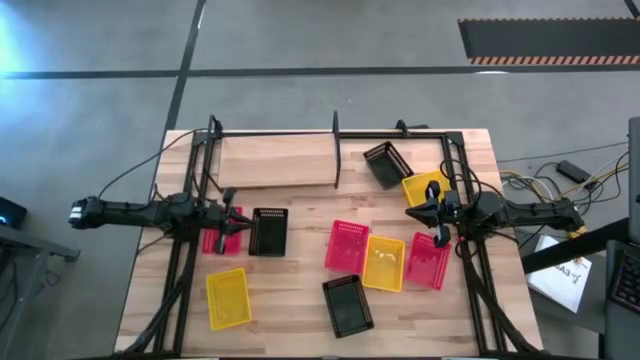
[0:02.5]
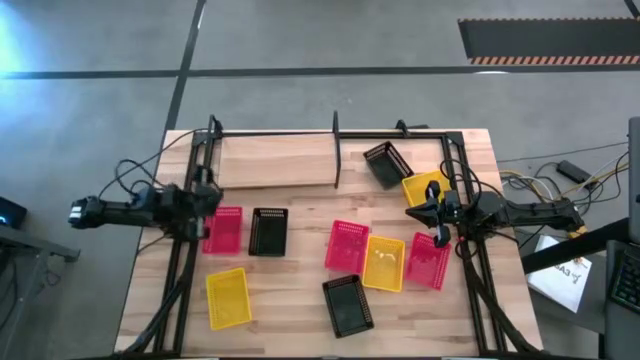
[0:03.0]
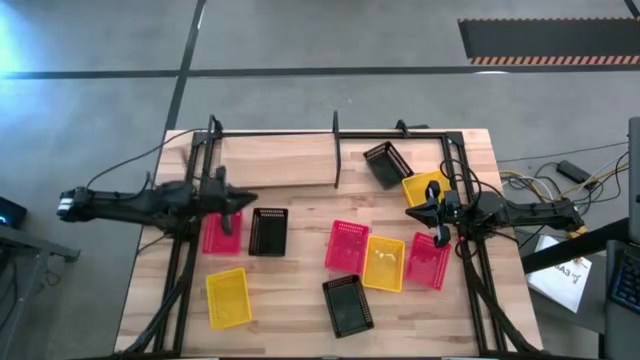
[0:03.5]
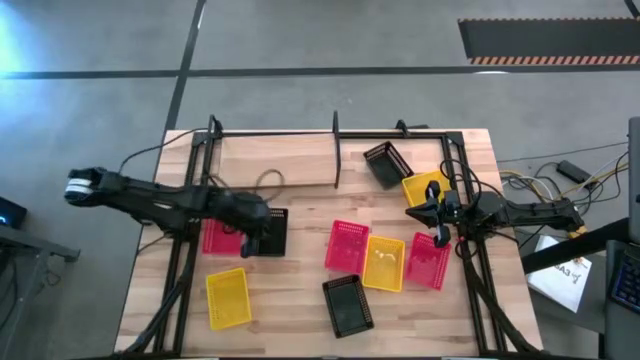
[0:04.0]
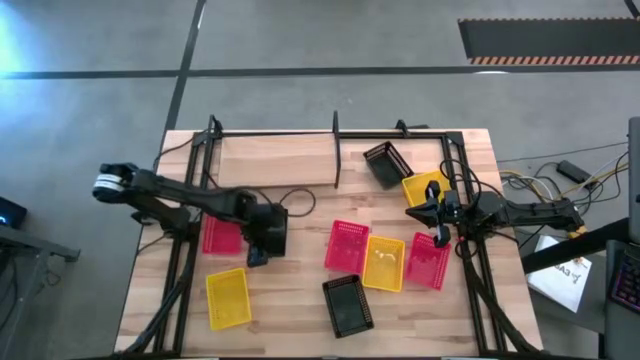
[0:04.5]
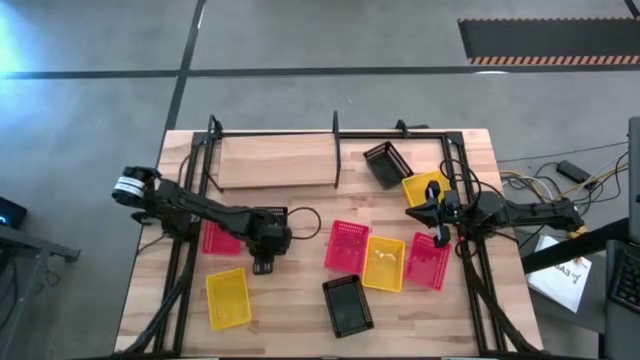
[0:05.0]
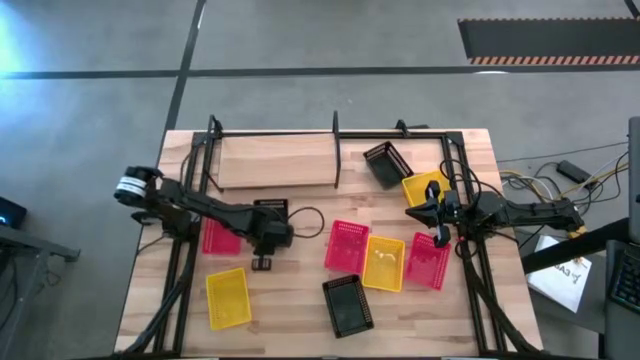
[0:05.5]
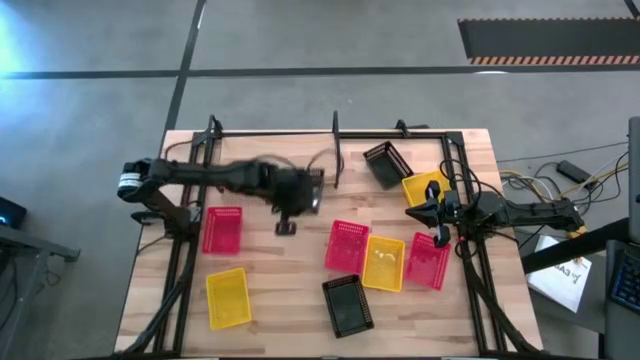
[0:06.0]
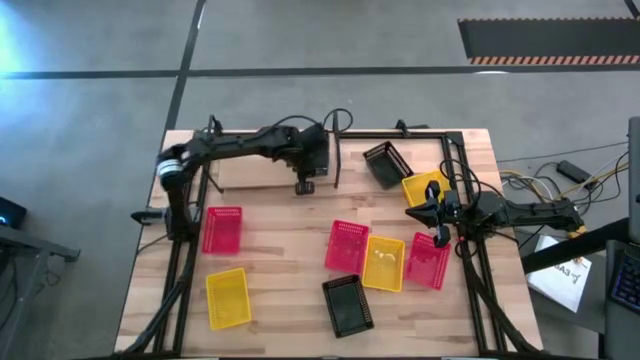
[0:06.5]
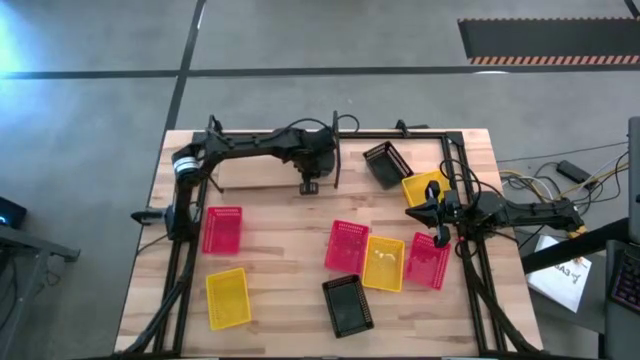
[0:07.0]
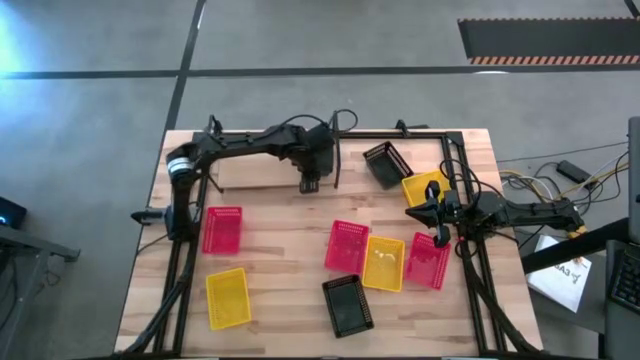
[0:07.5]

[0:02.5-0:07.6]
Task: Stack baskets on shelf by color
Put the left black bin on the shelf

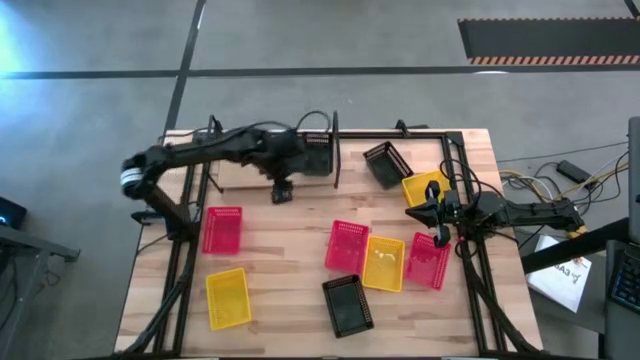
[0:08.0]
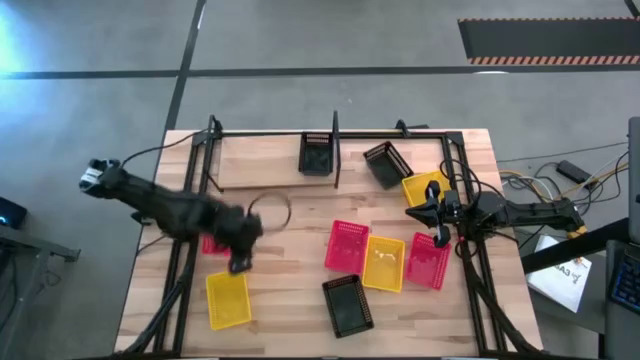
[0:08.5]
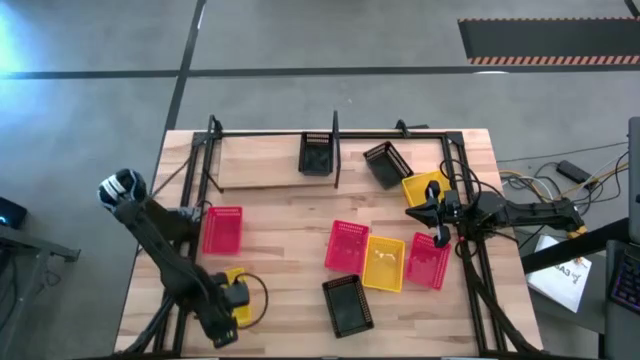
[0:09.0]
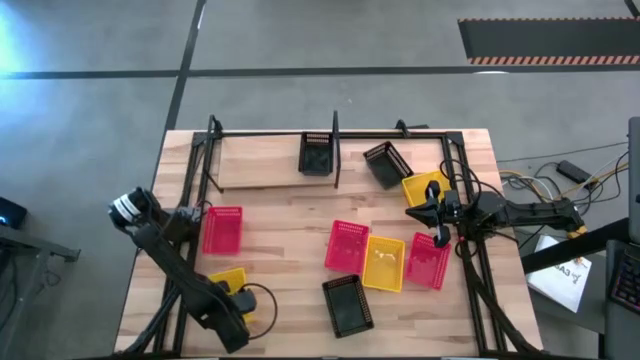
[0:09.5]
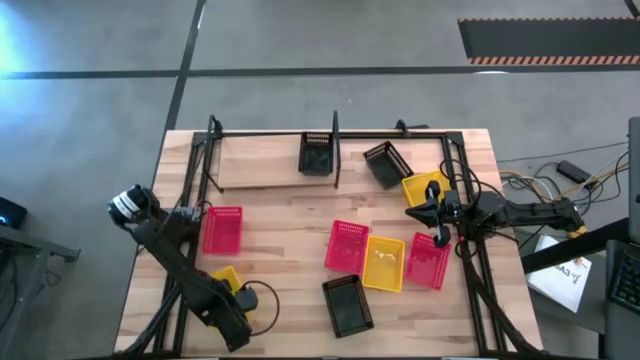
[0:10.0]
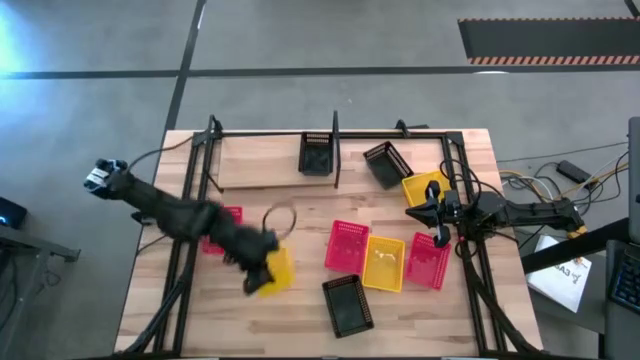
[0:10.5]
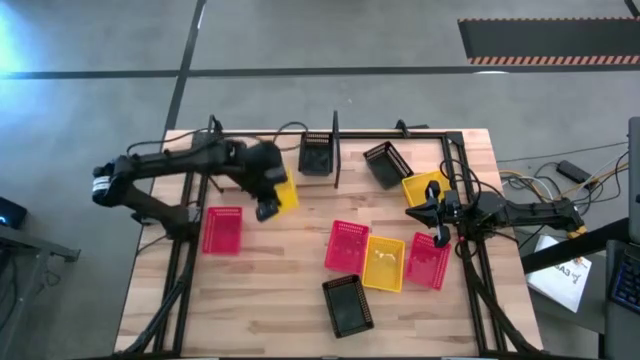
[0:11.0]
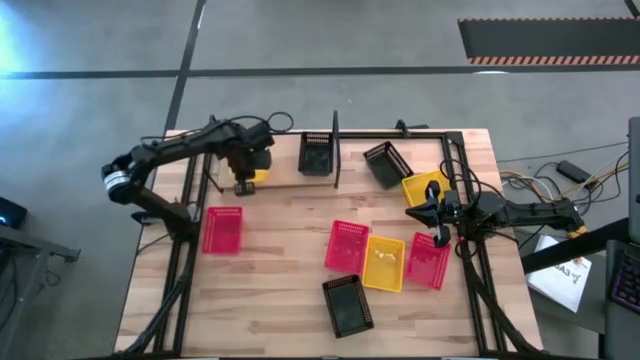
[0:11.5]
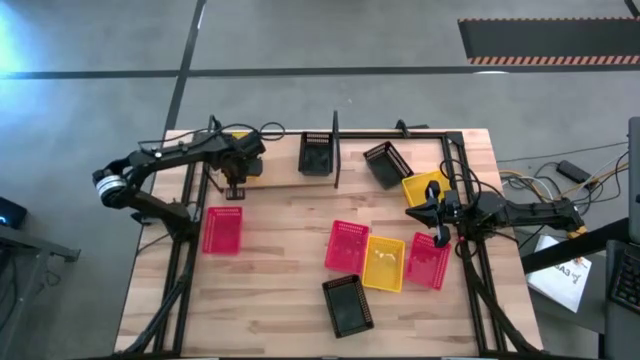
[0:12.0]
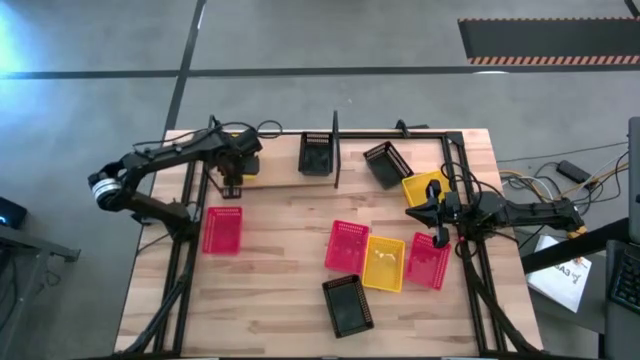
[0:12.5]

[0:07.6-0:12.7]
Put the left yellow bin on the shelf

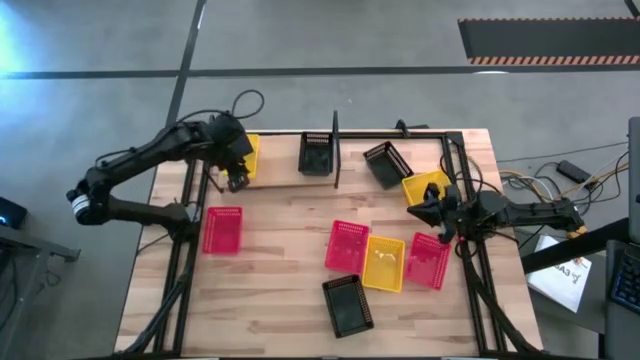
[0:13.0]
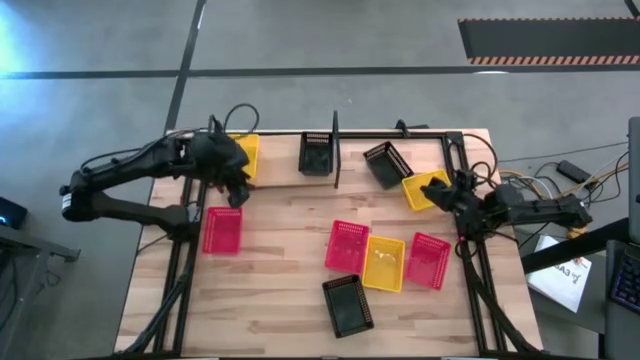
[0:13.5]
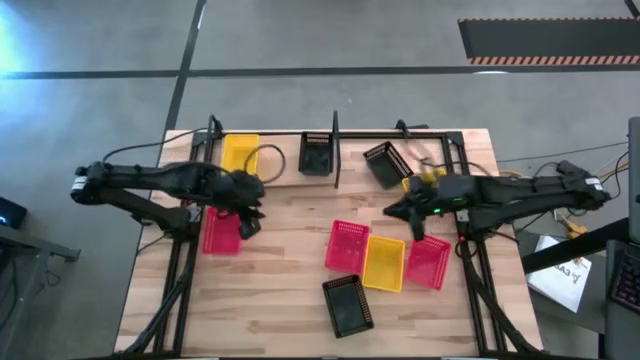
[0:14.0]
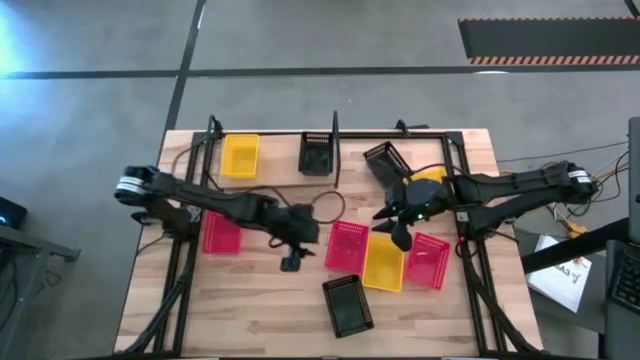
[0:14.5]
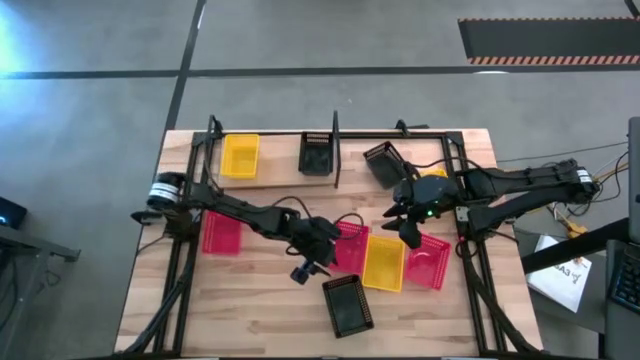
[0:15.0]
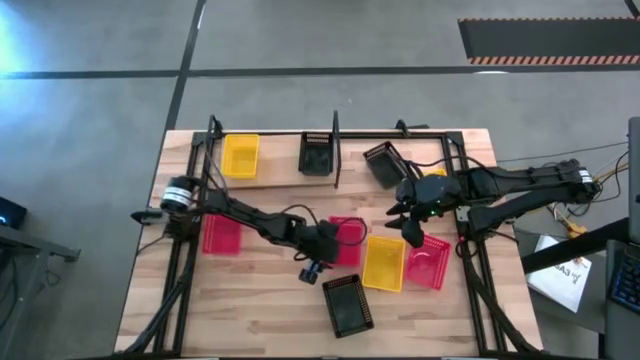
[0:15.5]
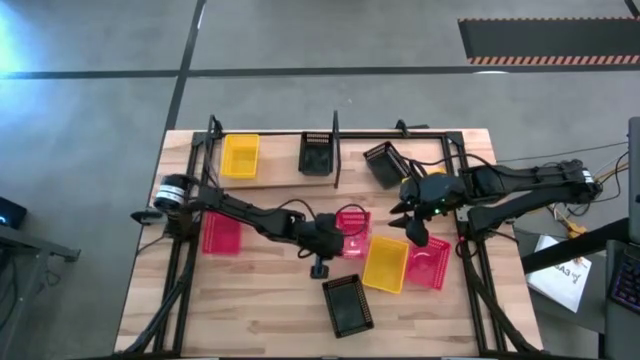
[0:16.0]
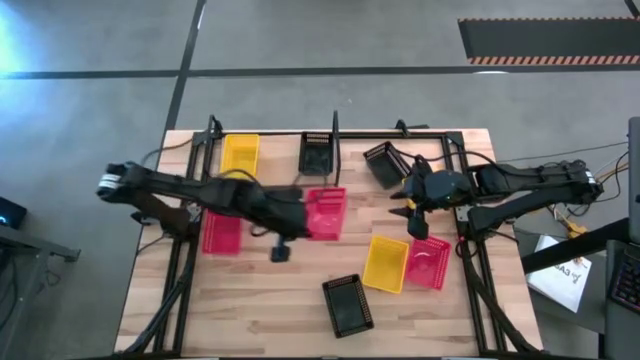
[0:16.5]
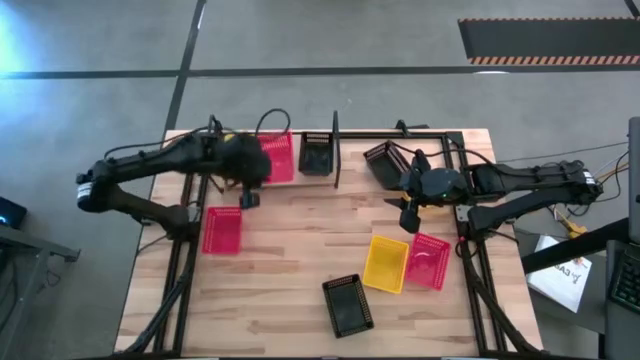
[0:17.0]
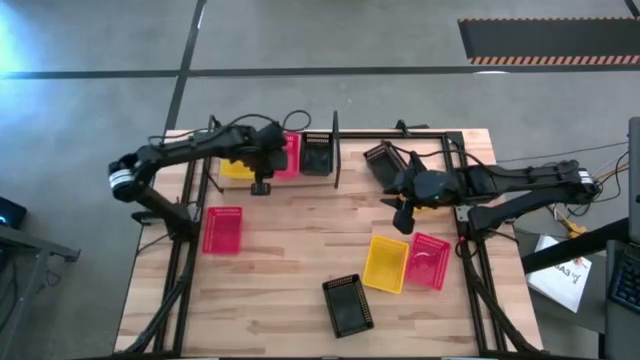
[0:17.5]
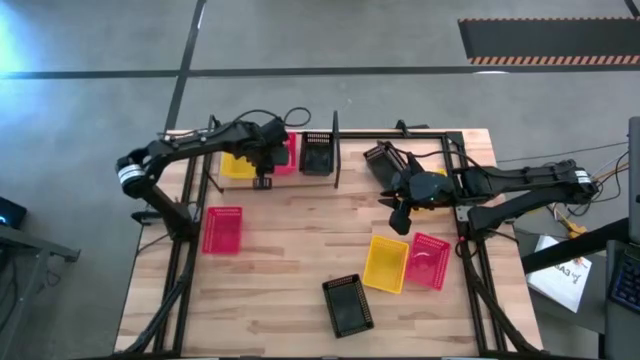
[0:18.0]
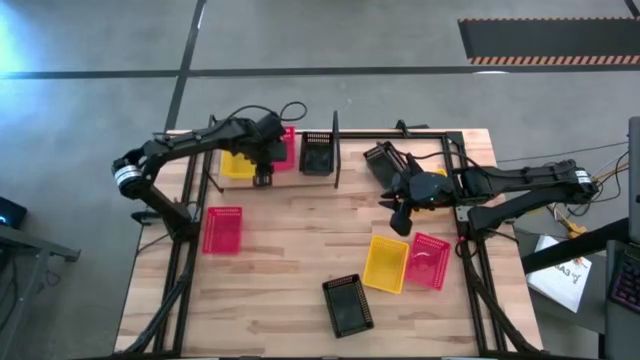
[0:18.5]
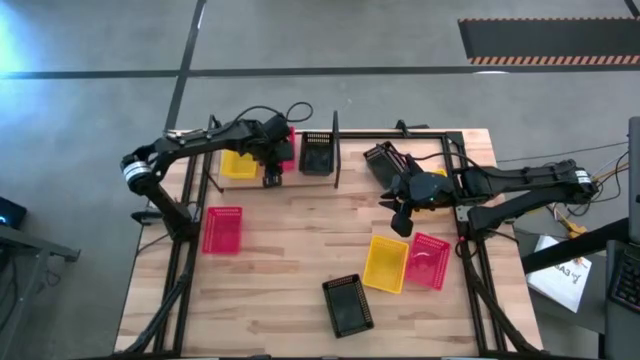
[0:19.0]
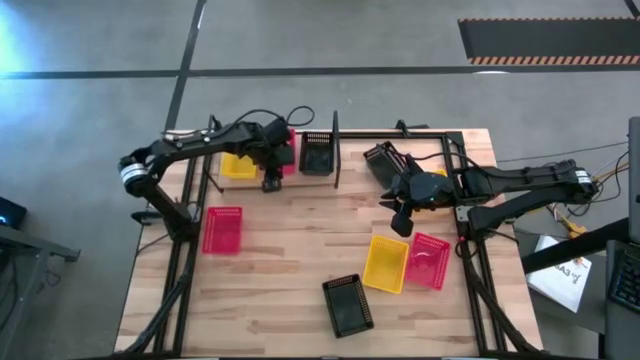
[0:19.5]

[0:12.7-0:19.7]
Put the middle red bin on the shelf

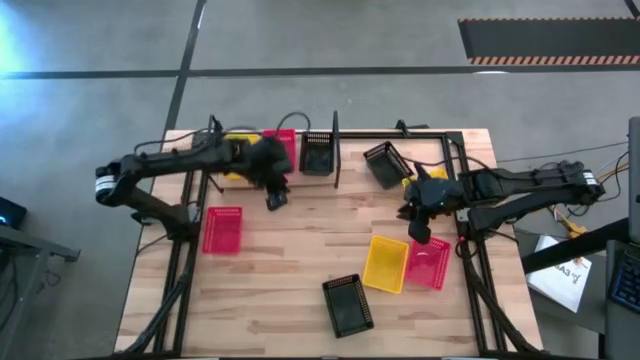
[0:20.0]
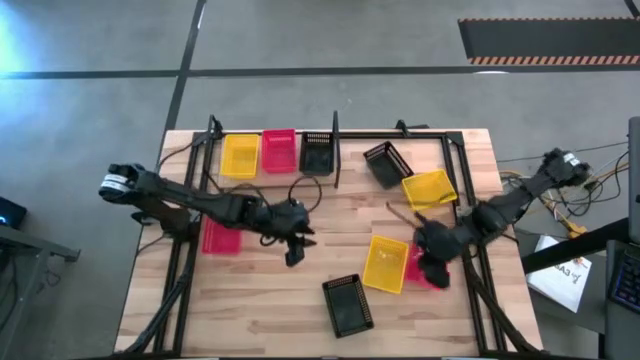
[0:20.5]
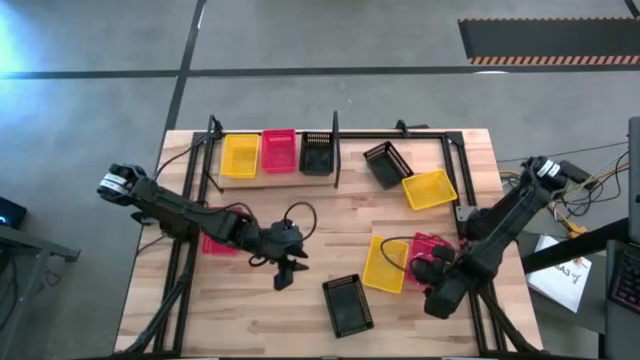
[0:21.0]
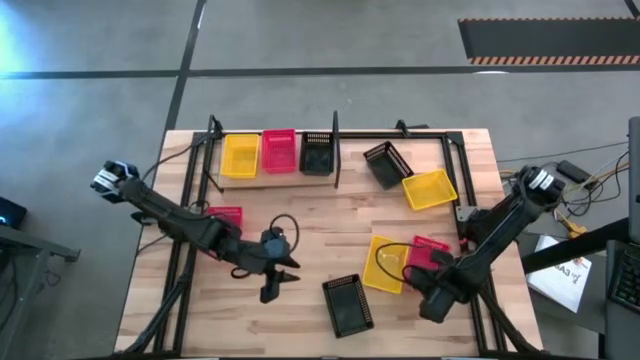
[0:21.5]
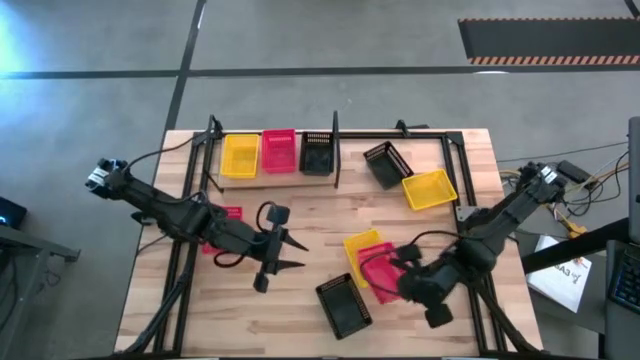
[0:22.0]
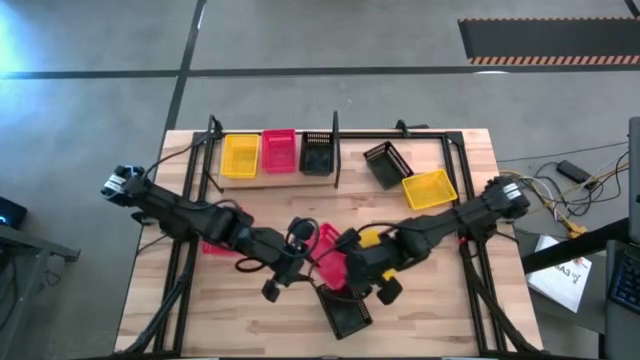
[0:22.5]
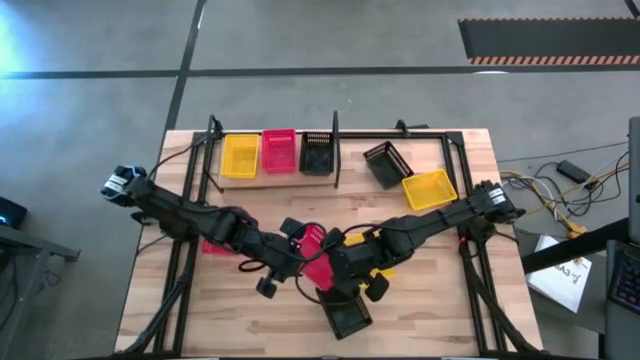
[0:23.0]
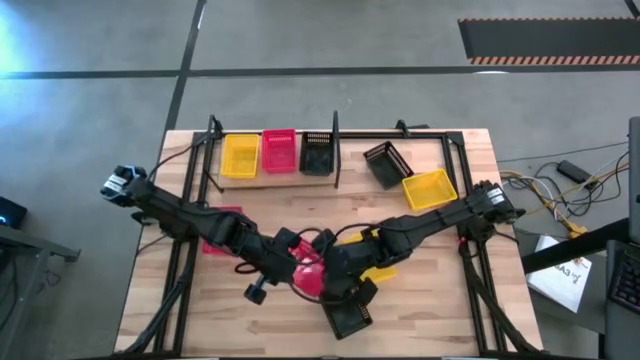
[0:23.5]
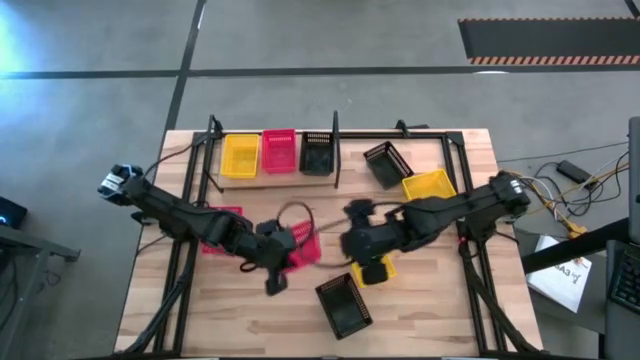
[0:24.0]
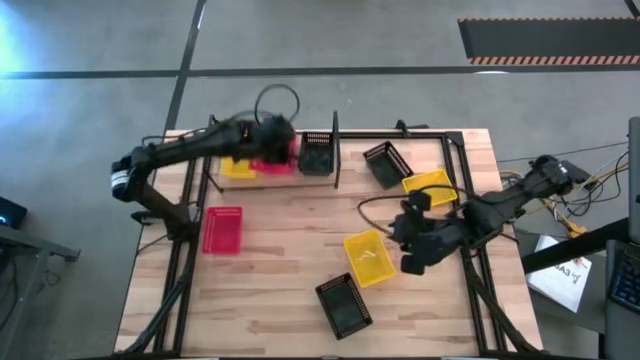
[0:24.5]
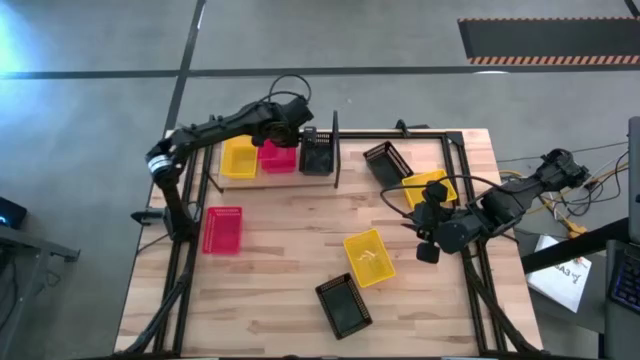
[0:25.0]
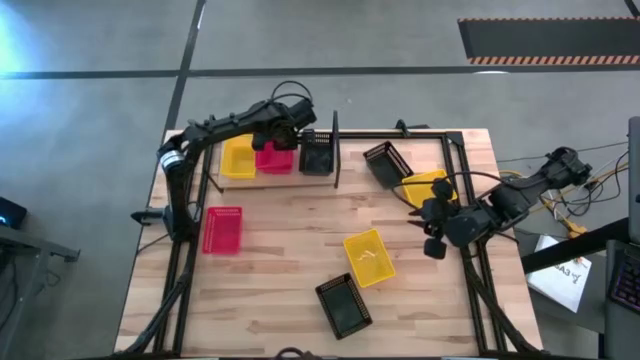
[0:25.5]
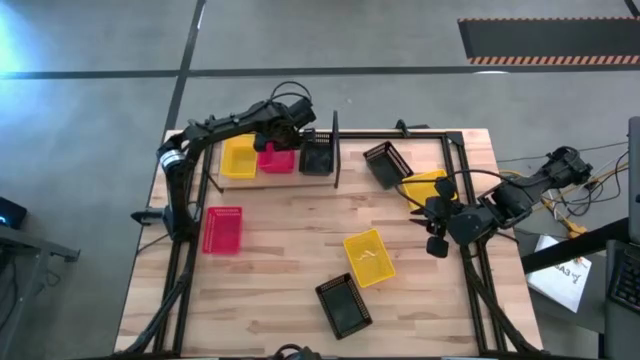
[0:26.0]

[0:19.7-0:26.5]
Stack the right red bin on top of the red bin on the shelf
